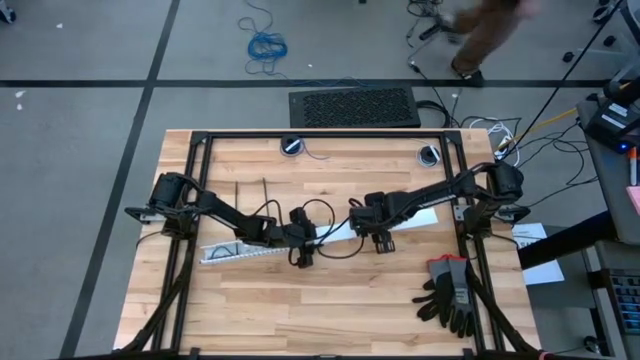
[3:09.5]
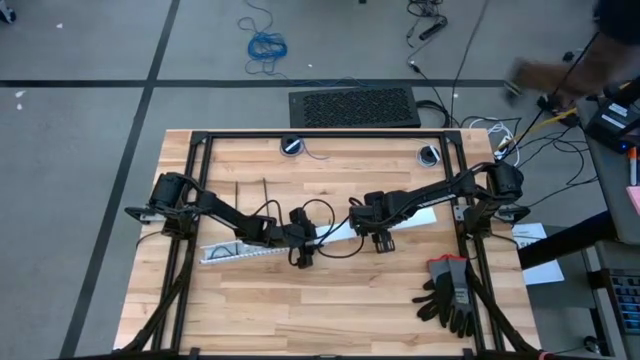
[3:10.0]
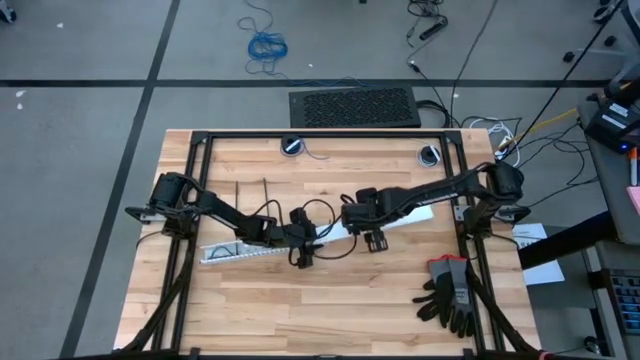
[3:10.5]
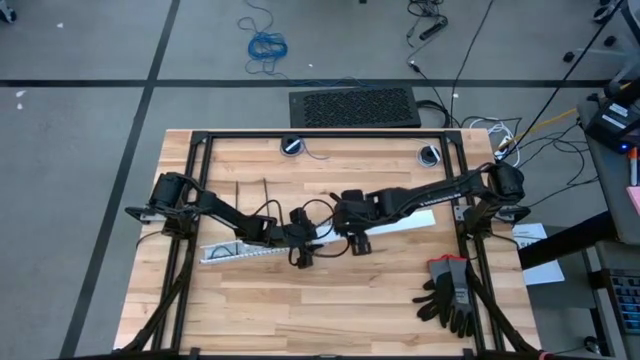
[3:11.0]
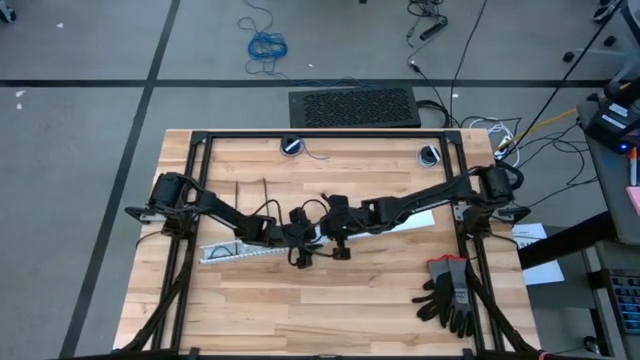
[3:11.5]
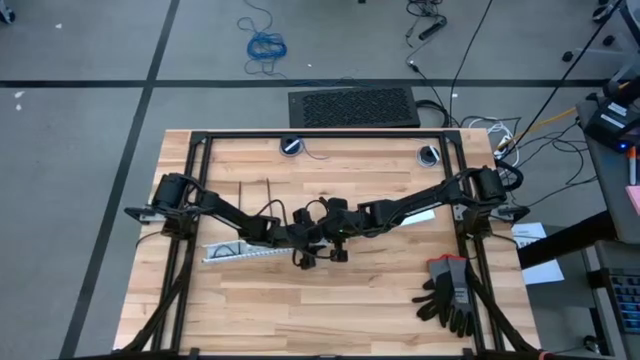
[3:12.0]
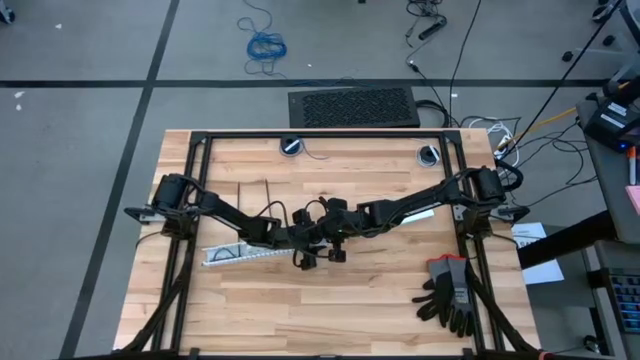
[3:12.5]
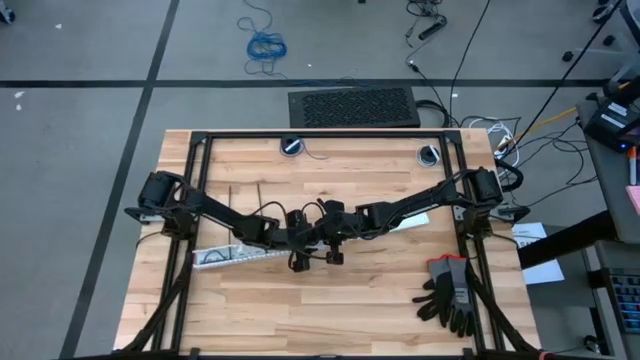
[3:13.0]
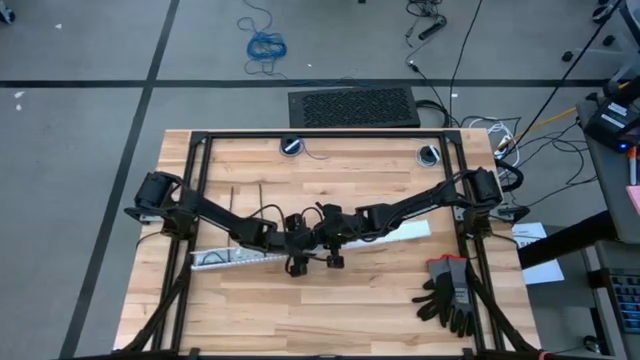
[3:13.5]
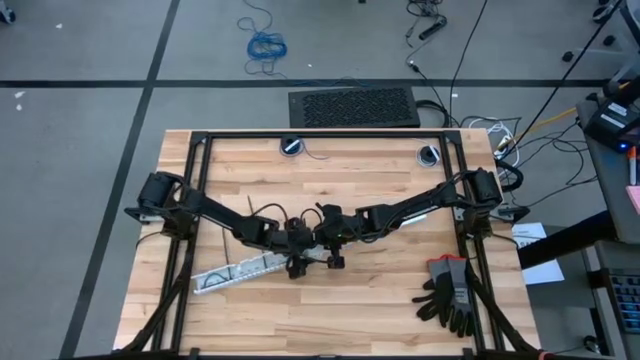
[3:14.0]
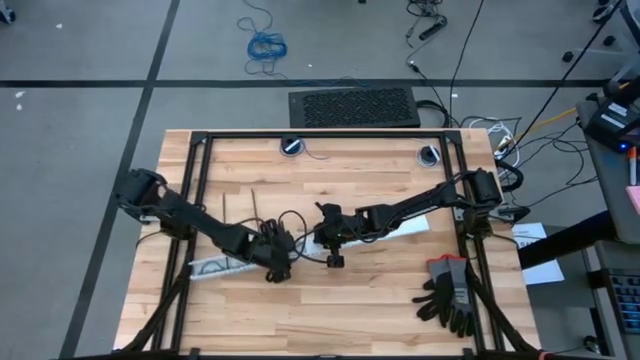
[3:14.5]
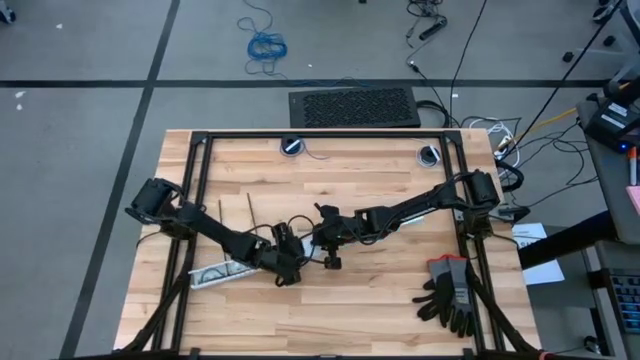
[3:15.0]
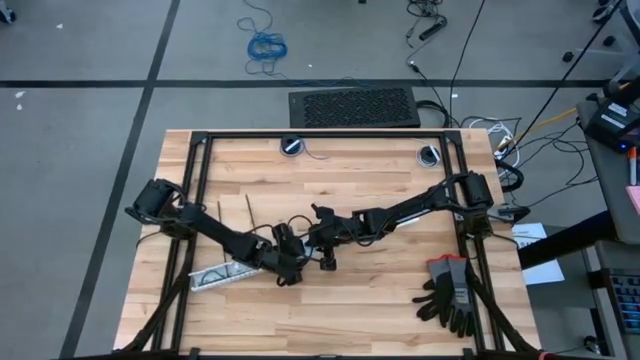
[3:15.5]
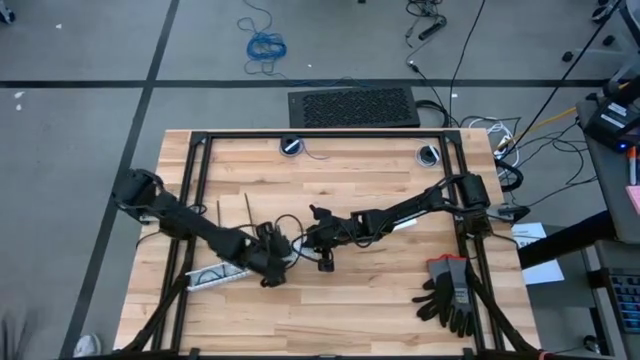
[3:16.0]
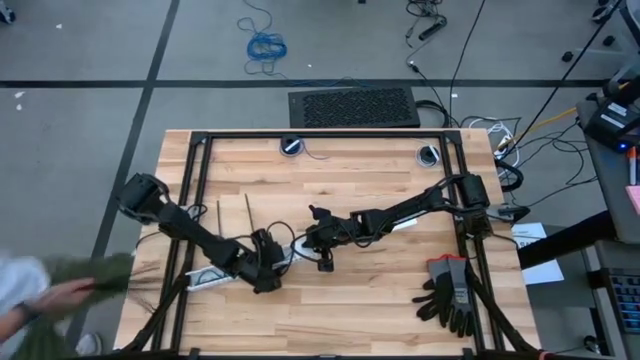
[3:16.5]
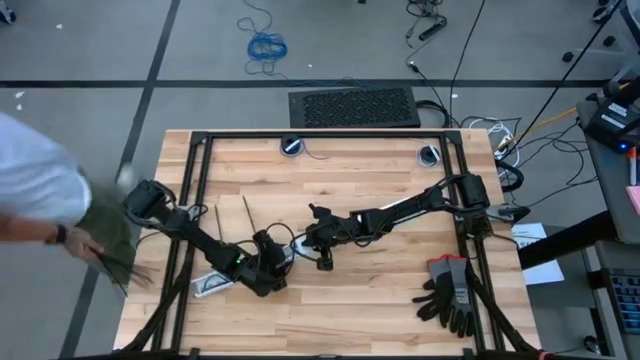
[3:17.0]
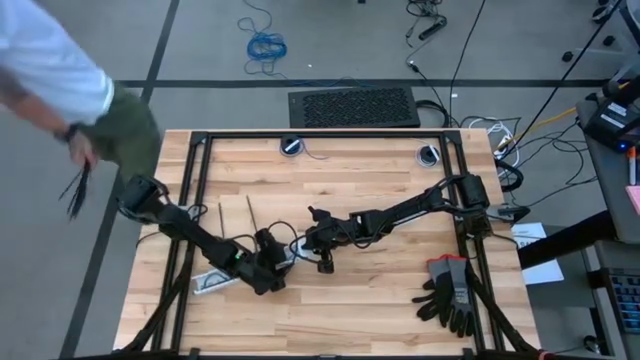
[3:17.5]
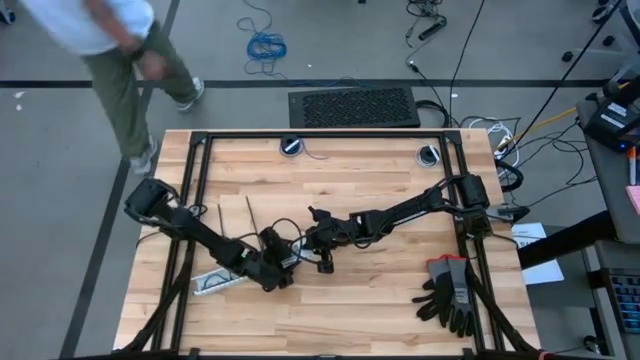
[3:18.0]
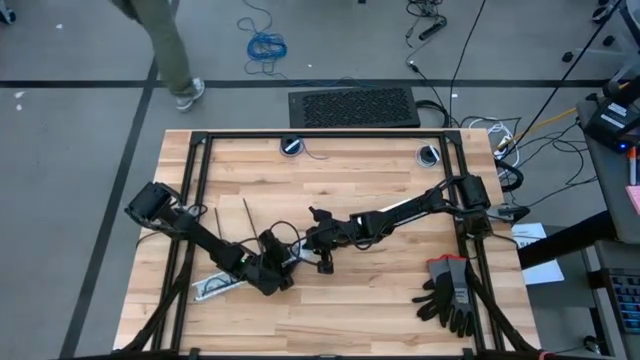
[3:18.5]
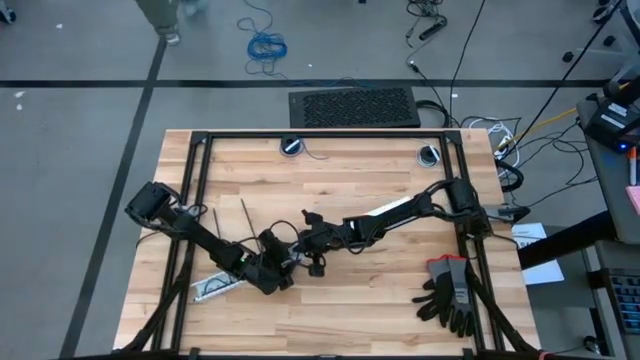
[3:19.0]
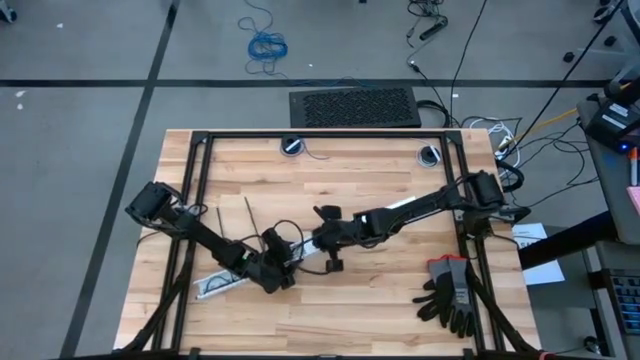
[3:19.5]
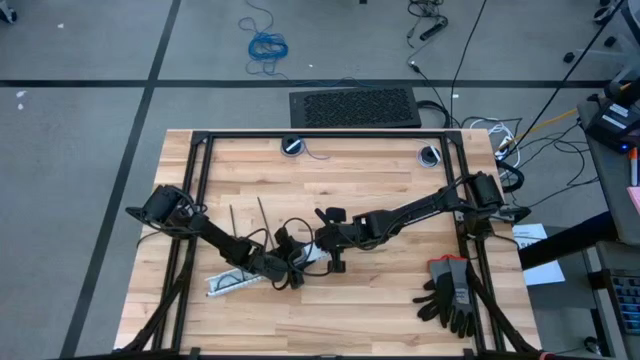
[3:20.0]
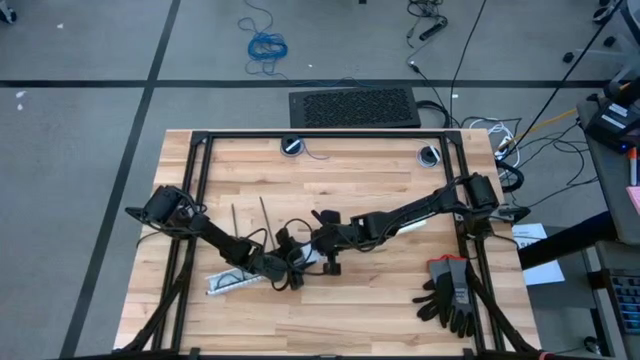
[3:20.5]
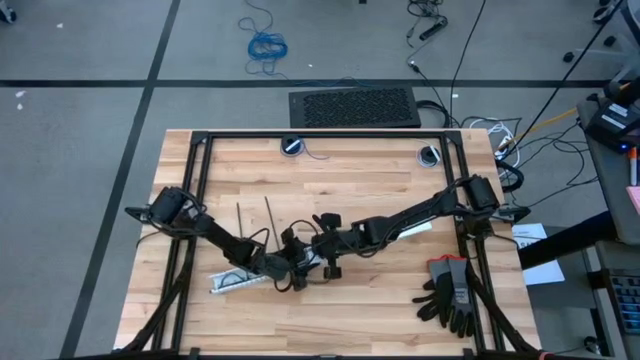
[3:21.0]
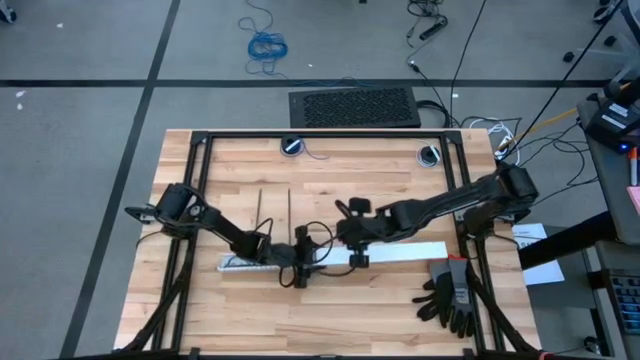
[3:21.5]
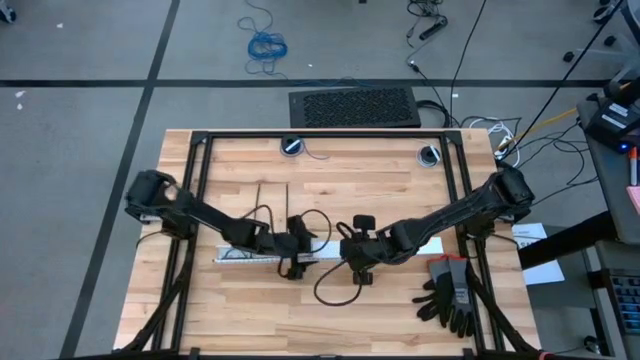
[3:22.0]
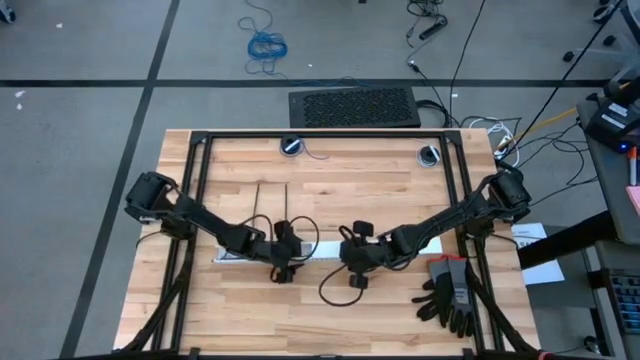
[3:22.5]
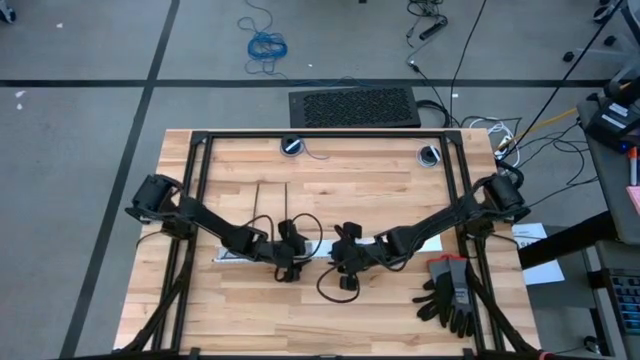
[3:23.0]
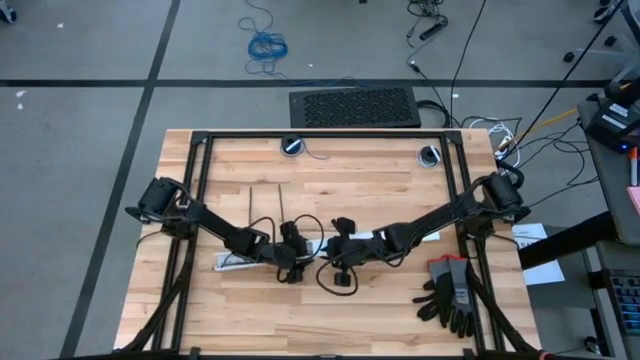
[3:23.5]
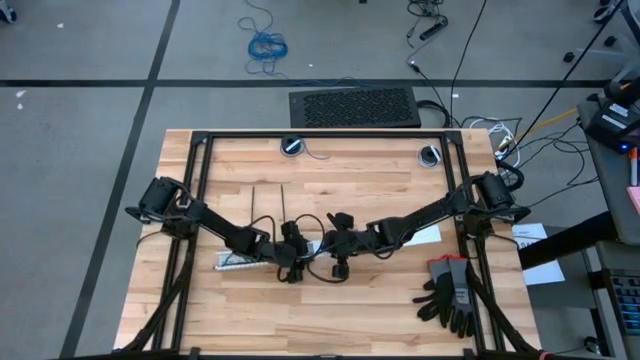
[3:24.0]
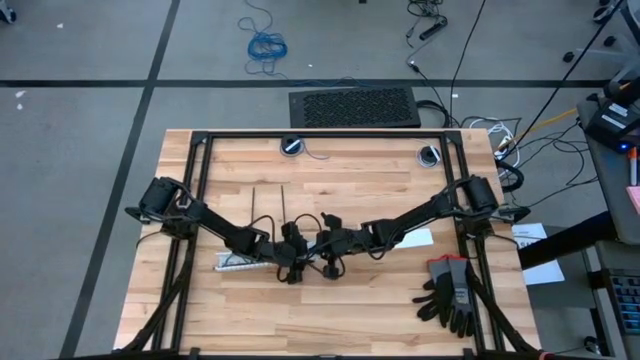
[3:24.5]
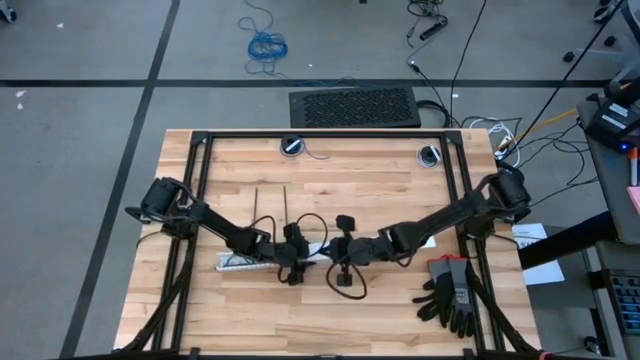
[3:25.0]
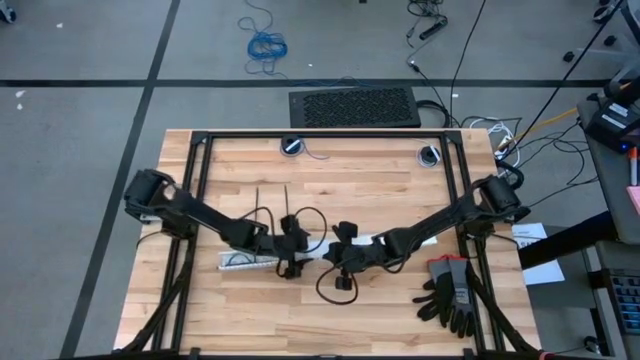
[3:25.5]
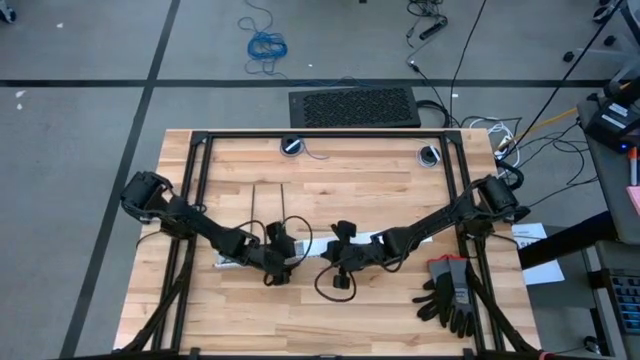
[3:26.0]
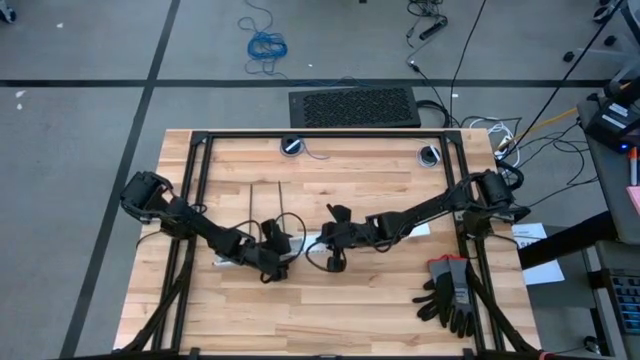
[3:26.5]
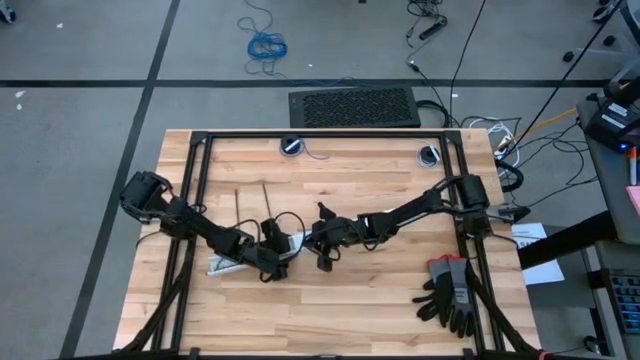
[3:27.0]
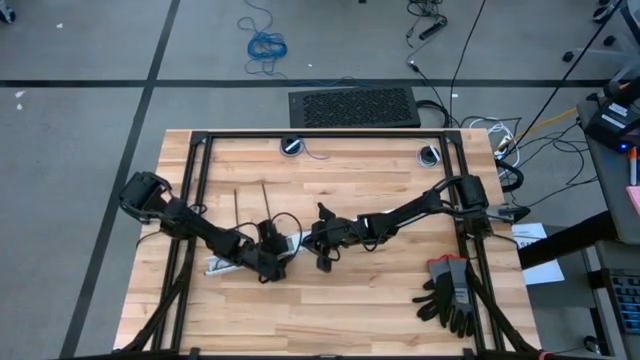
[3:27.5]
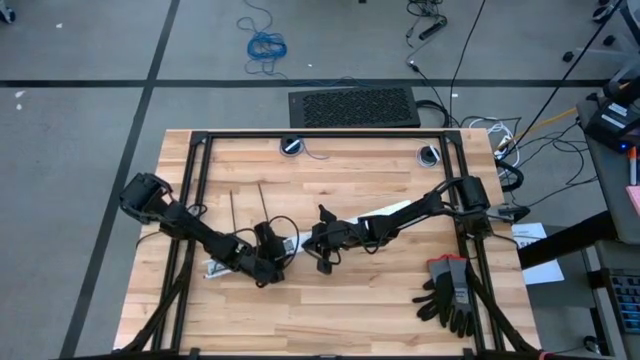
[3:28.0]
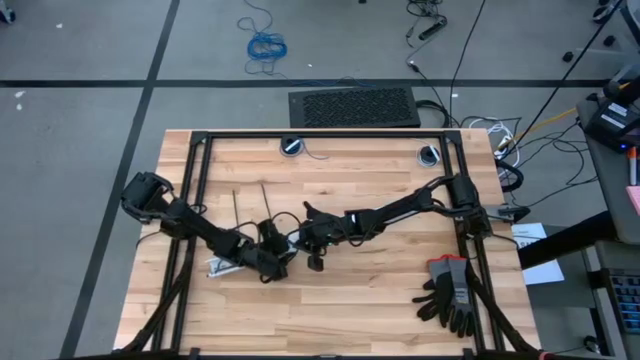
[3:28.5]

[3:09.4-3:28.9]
Task: Ziptie cables
Close the white cable duct

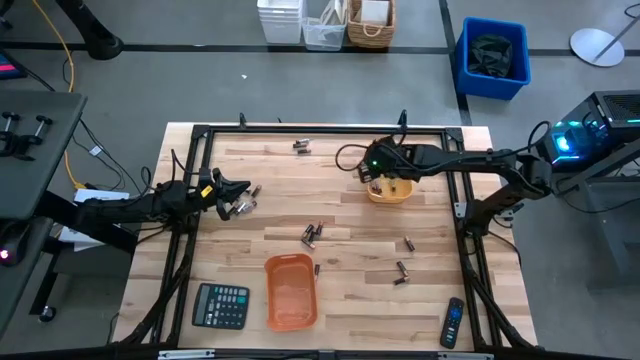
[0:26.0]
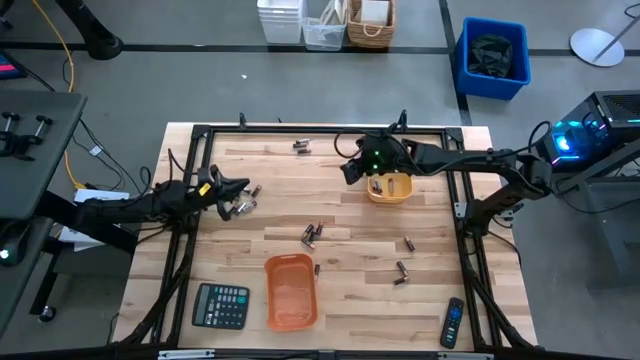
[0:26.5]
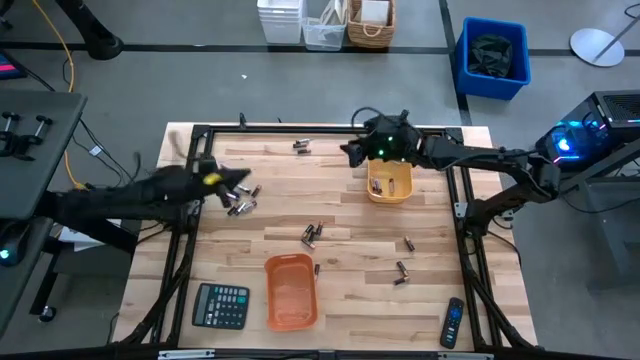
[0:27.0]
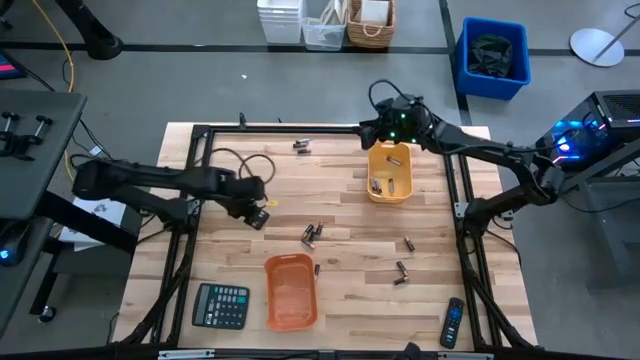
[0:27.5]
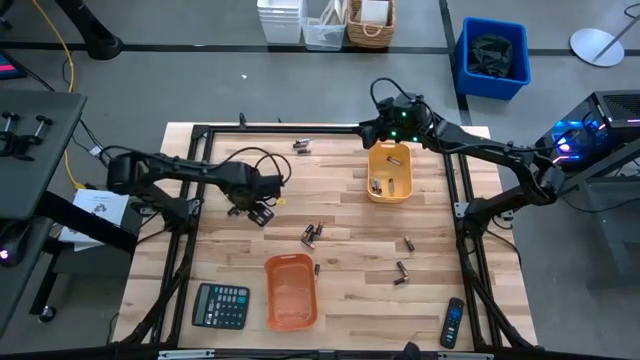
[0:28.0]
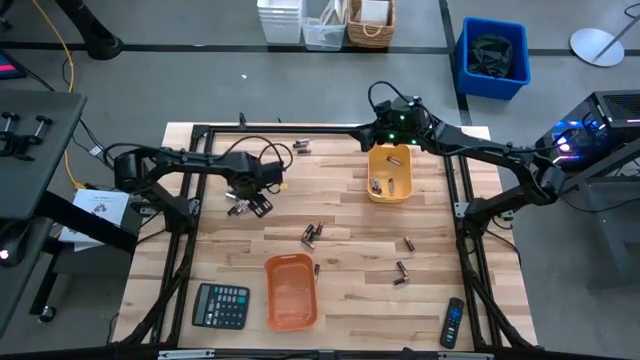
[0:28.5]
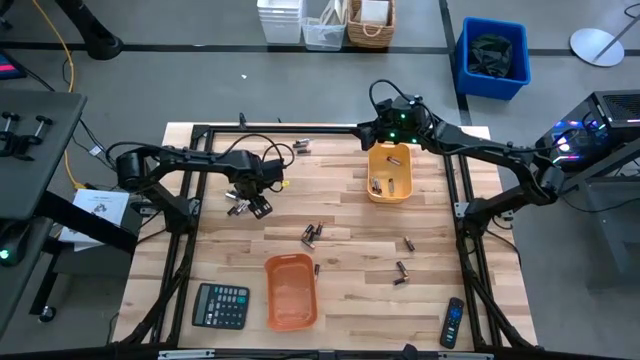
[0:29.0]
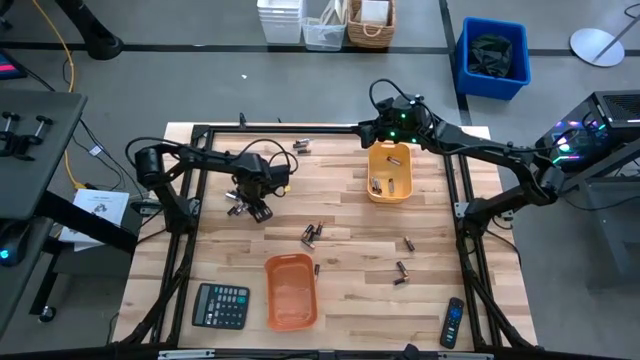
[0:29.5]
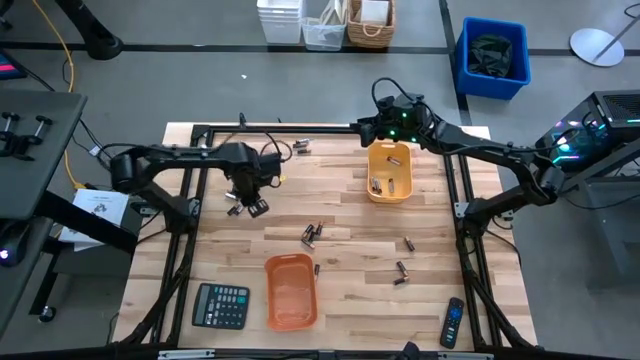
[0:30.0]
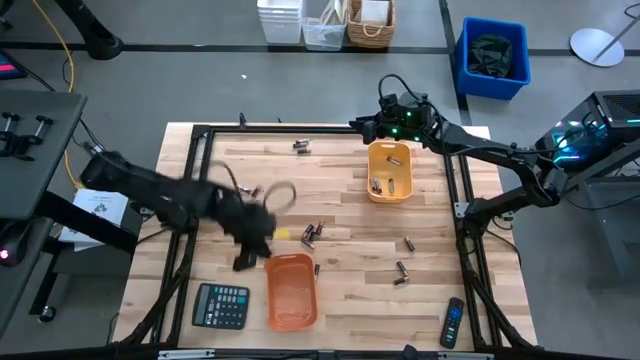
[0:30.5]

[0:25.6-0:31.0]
Task: Sort batteries
Put the silver battery into the yellow bin
